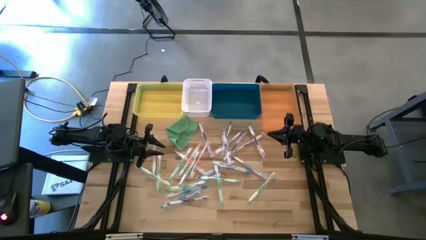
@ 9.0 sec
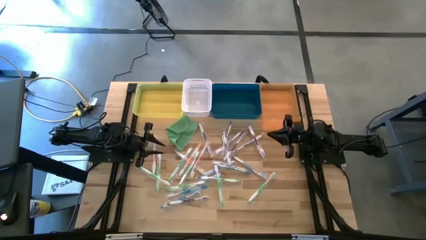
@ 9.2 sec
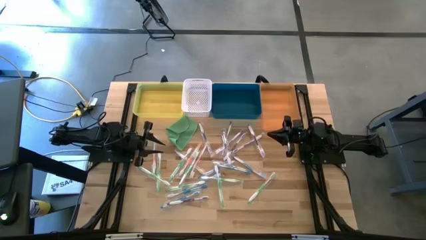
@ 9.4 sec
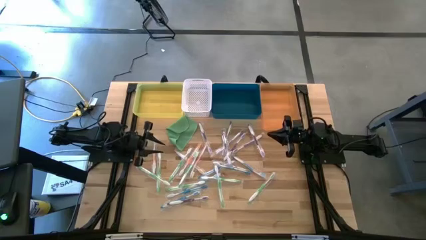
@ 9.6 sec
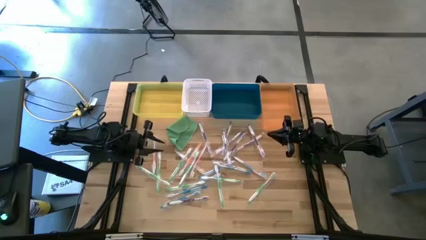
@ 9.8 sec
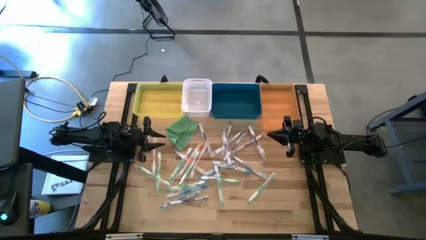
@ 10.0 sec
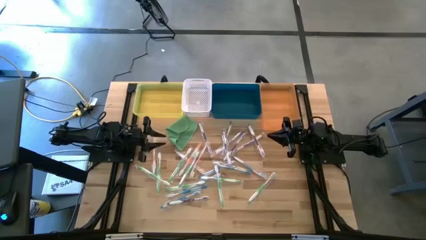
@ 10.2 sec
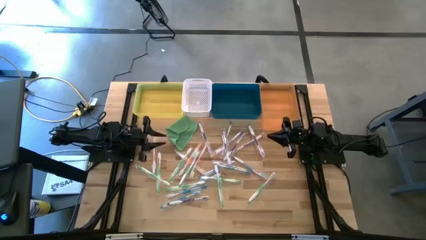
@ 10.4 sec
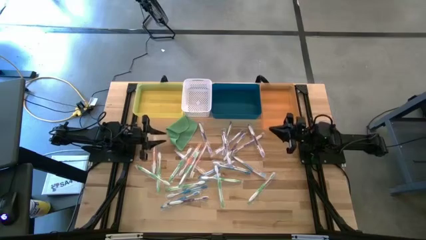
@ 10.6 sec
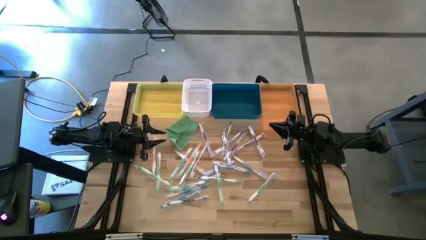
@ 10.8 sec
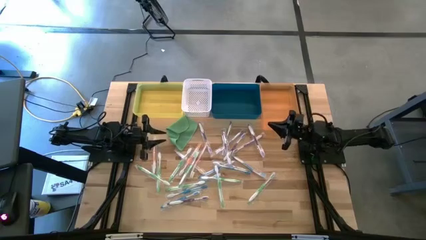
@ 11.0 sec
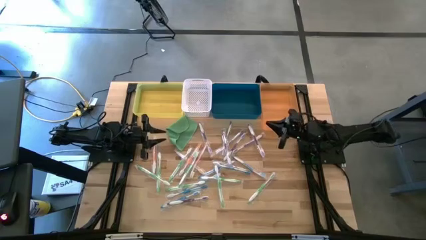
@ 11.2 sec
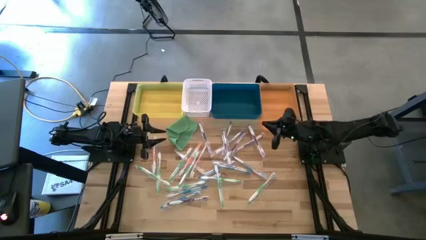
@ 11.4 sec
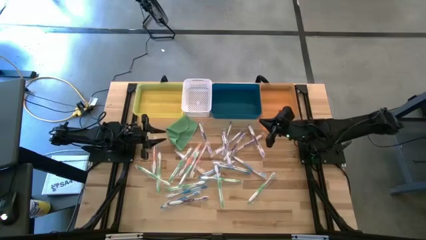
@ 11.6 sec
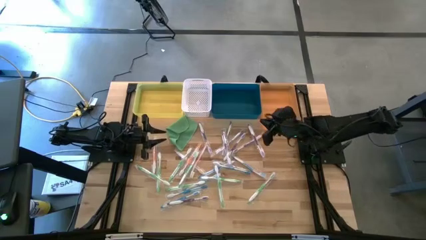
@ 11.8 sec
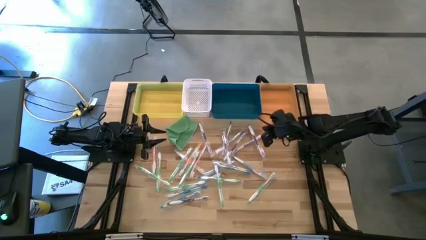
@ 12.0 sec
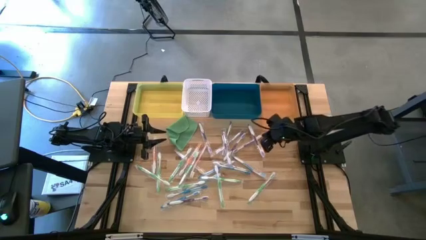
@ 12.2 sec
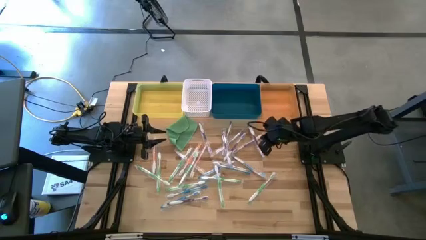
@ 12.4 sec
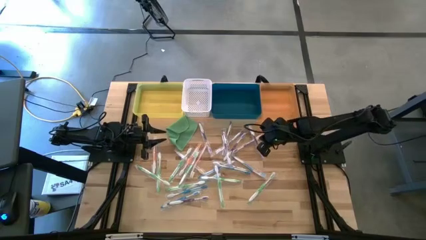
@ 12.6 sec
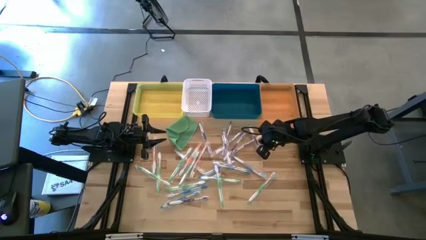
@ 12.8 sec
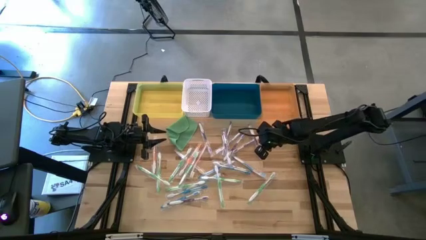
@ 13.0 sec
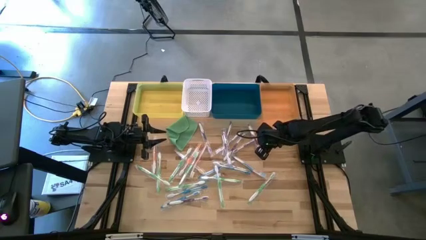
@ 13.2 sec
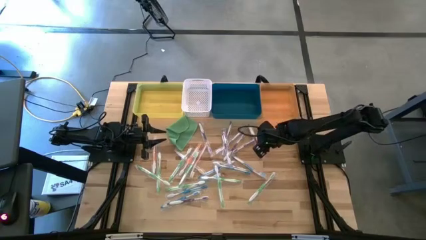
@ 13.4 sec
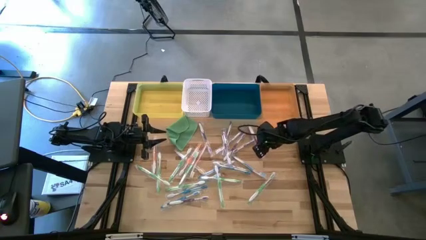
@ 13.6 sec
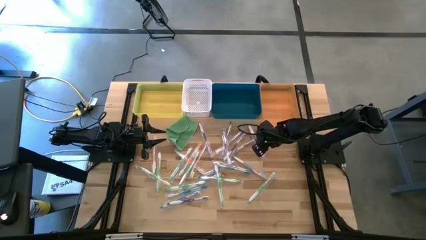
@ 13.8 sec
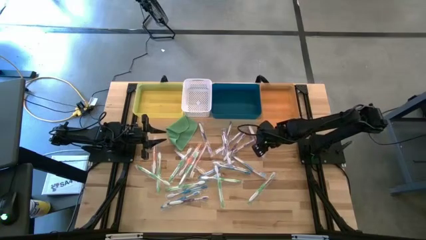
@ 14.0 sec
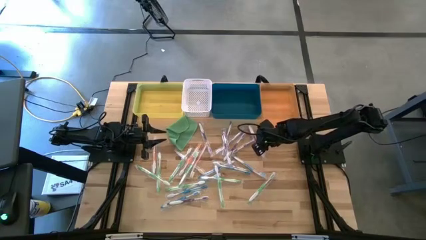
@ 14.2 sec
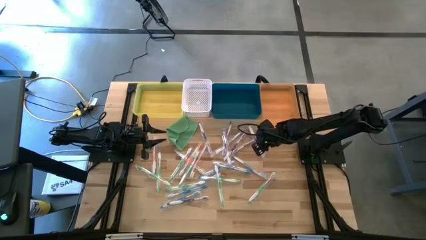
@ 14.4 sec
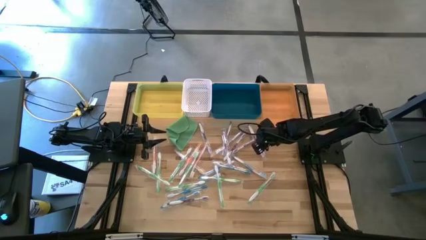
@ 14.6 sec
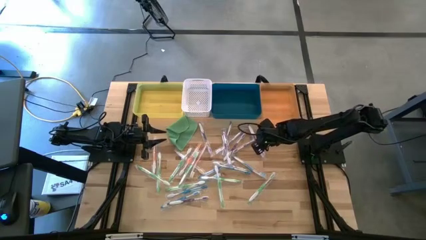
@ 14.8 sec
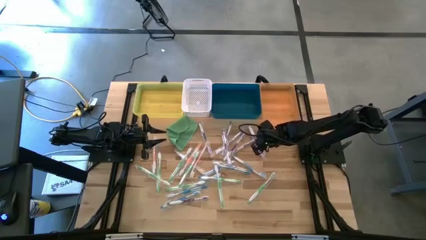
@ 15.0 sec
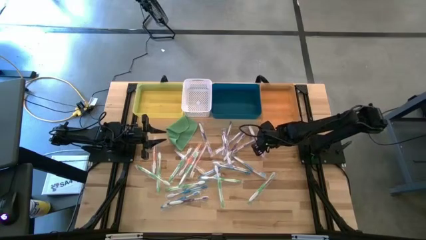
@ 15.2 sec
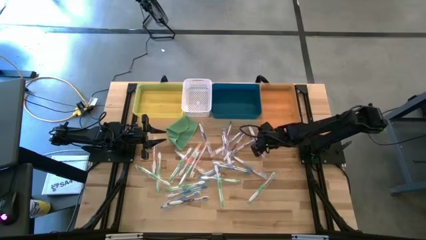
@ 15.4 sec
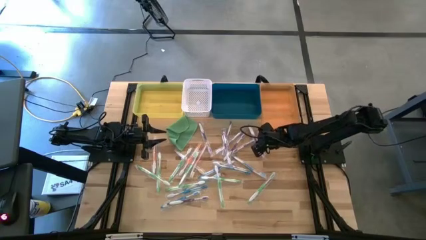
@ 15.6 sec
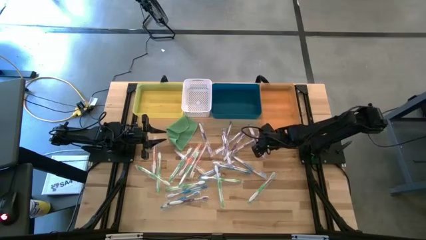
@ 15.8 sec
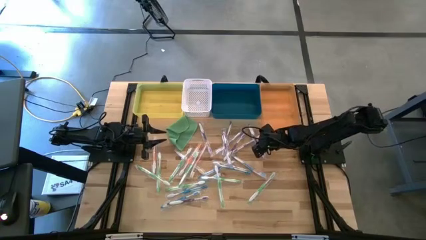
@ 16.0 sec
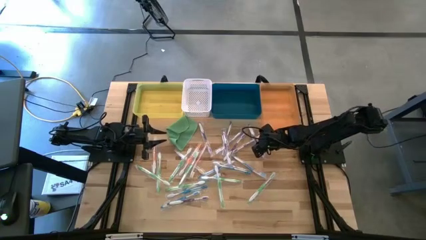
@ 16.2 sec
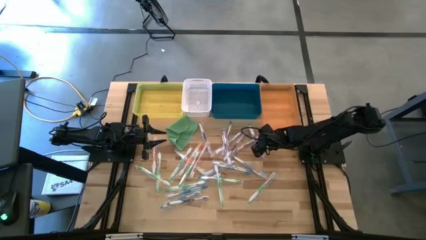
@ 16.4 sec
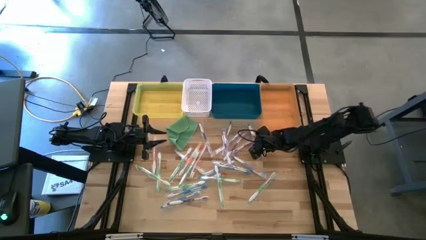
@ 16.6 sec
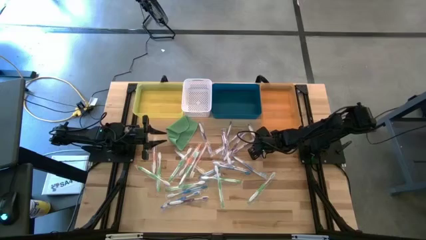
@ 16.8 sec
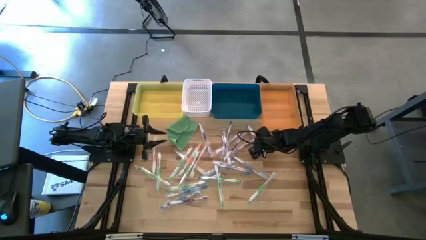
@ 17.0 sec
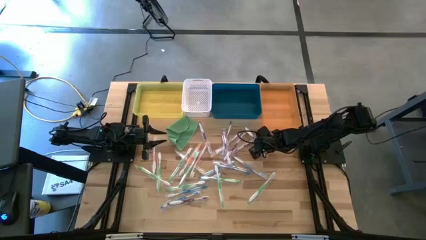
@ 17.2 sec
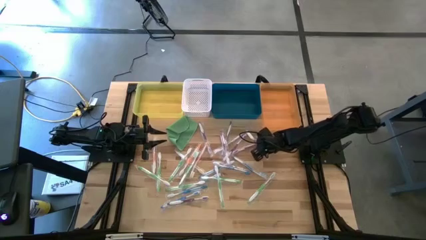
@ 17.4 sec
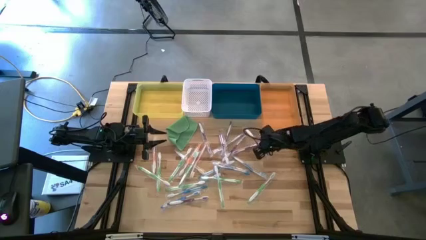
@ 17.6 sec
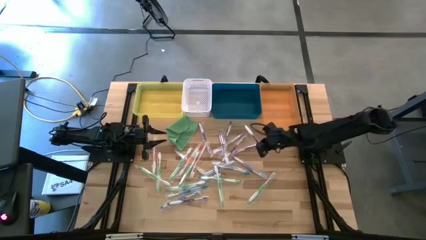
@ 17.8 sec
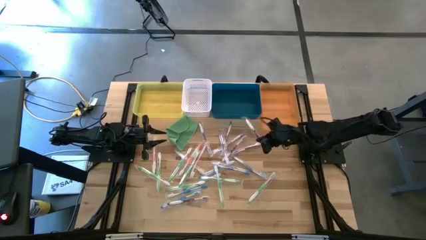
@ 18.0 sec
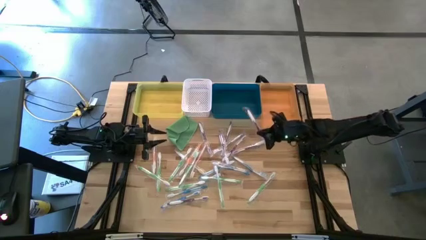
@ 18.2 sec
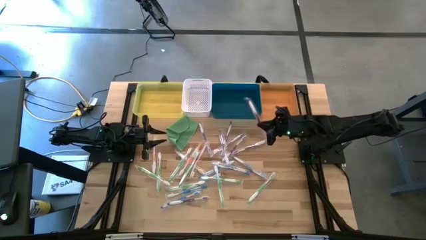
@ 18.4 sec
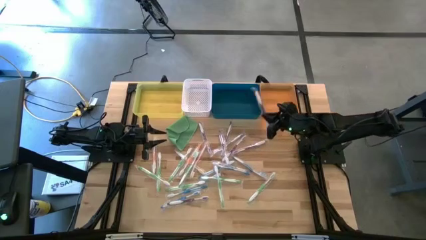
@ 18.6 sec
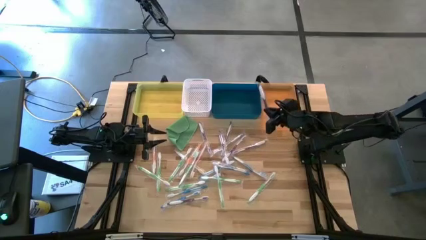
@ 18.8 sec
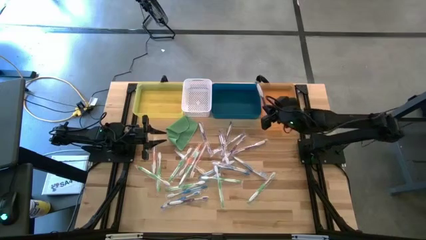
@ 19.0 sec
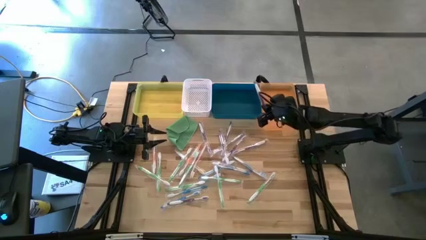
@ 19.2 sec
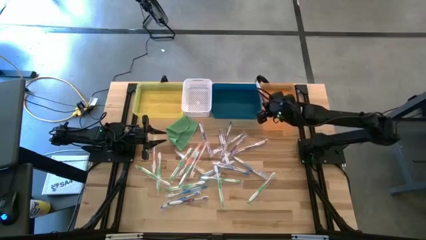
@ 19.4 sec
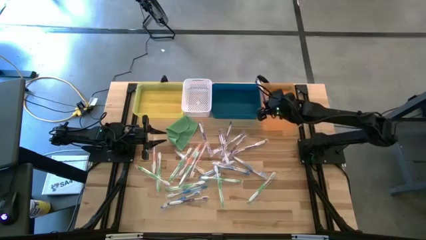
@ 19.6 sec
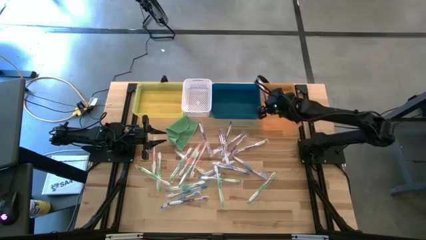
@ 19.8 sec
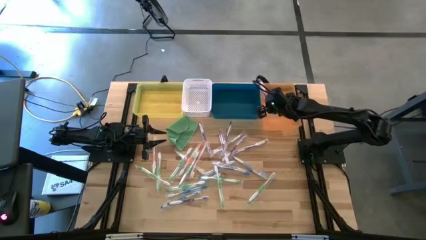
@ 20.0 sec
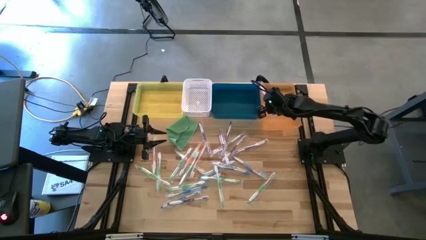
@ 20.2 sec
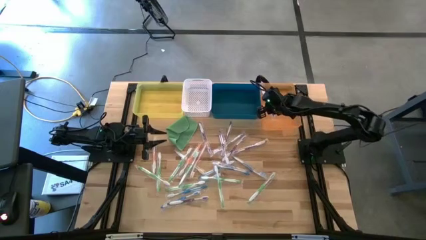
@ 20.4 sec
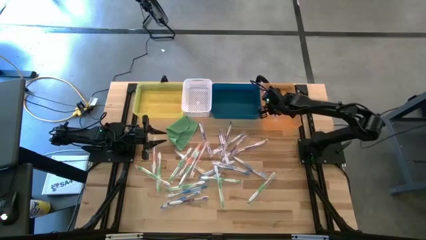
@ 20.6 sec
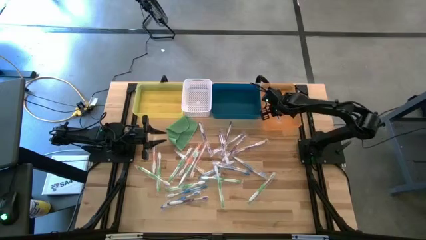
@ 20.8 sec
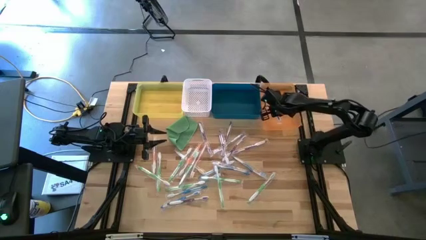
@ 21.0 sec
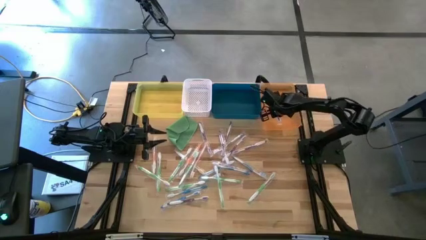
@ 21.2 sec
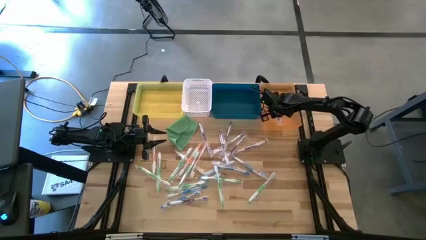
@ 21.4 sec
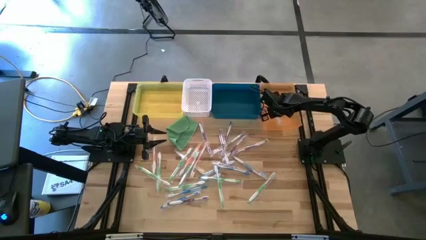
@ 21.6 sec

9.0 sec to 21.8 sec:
Task: Pick & Place Toothbrushes
Put the violet toothbrush into the orange bin
